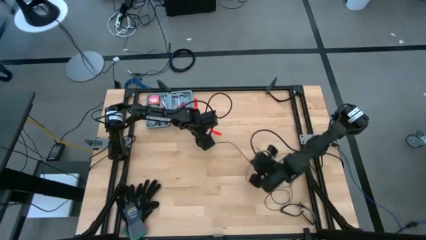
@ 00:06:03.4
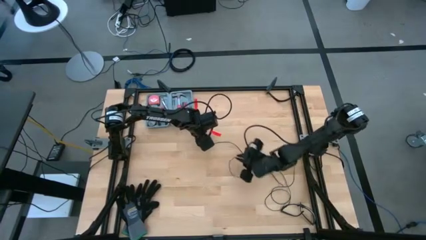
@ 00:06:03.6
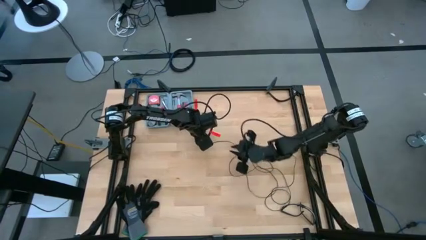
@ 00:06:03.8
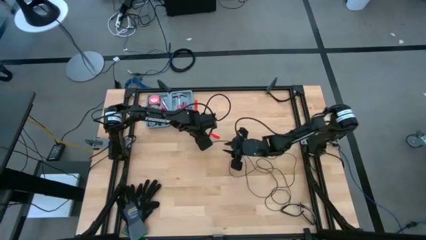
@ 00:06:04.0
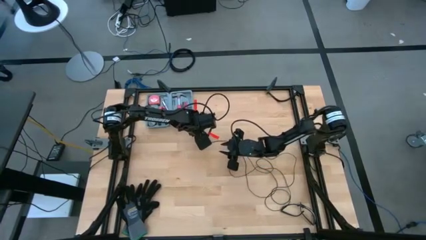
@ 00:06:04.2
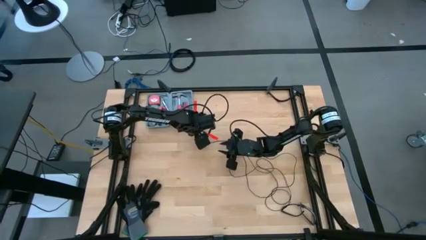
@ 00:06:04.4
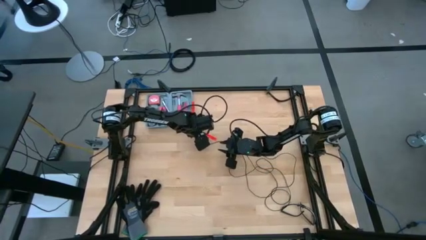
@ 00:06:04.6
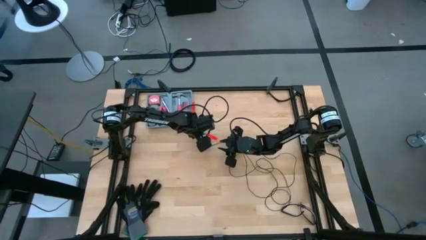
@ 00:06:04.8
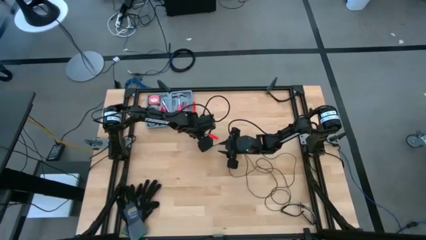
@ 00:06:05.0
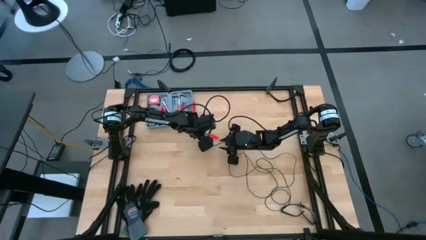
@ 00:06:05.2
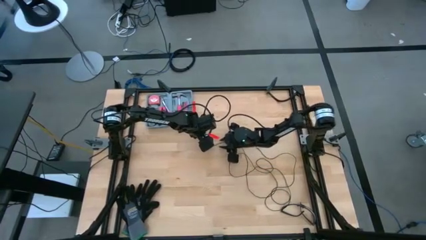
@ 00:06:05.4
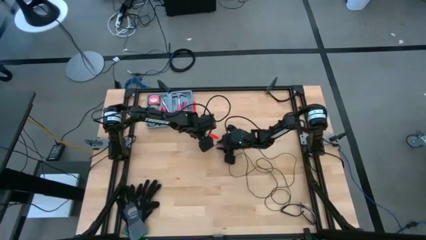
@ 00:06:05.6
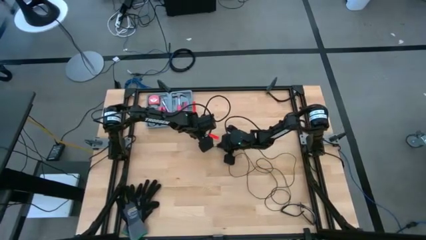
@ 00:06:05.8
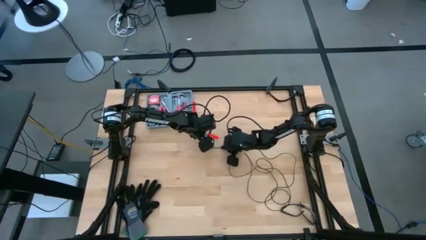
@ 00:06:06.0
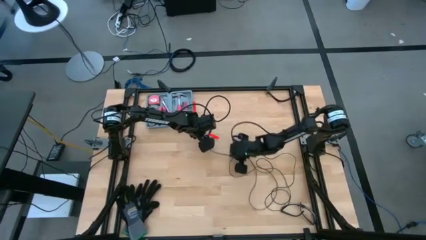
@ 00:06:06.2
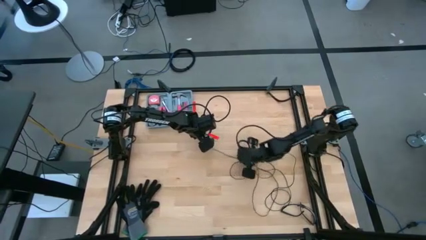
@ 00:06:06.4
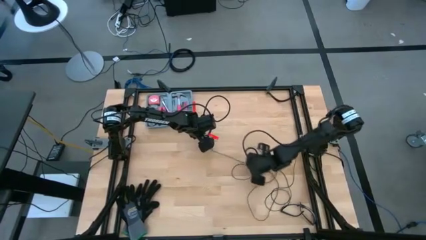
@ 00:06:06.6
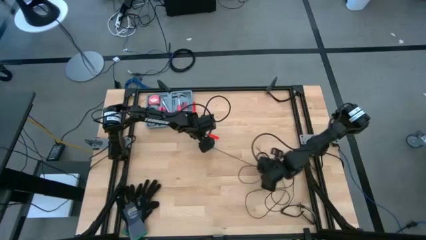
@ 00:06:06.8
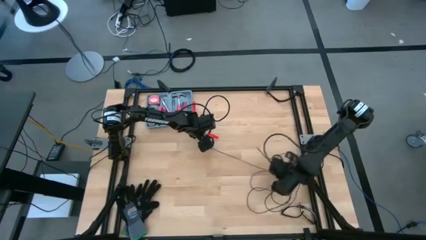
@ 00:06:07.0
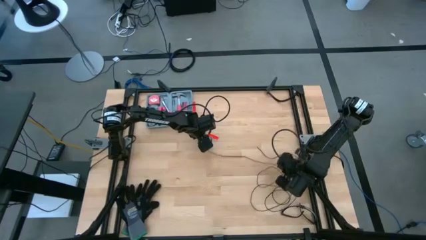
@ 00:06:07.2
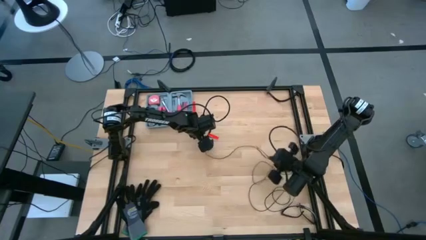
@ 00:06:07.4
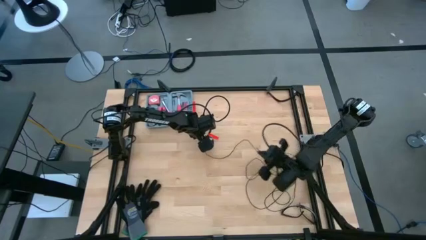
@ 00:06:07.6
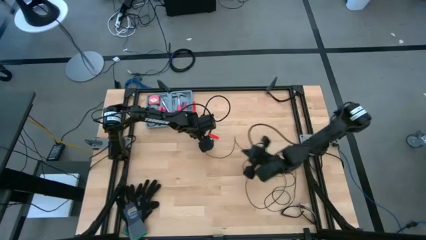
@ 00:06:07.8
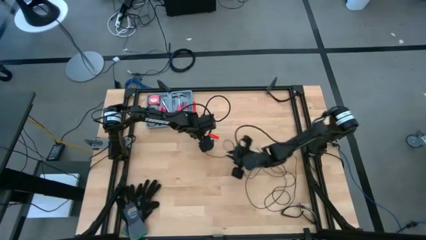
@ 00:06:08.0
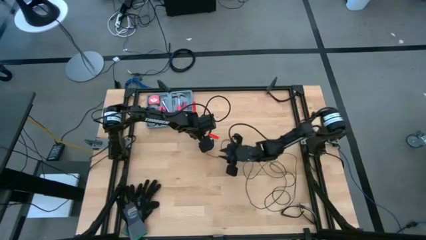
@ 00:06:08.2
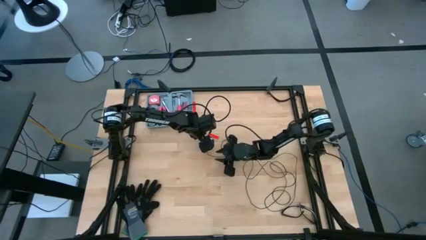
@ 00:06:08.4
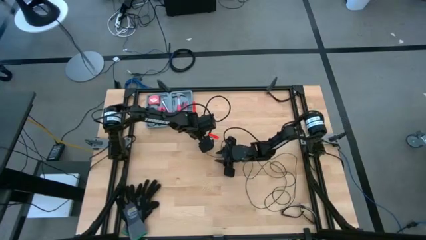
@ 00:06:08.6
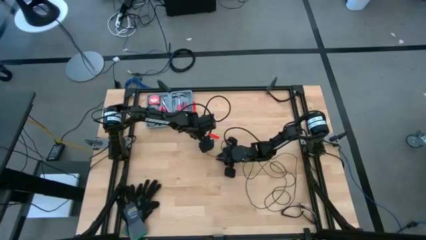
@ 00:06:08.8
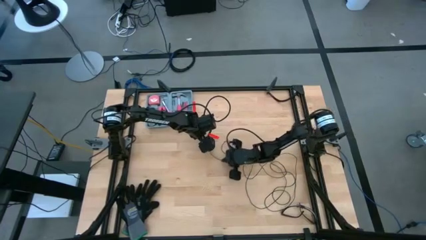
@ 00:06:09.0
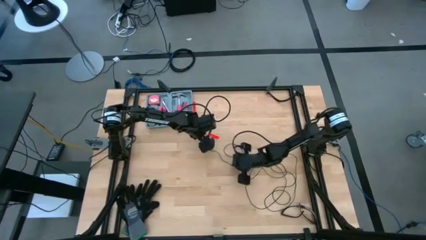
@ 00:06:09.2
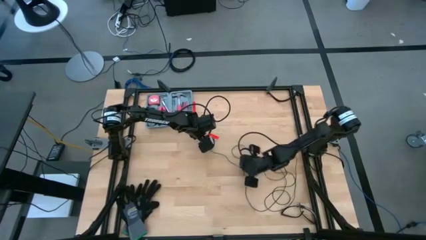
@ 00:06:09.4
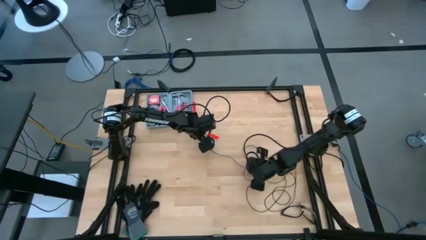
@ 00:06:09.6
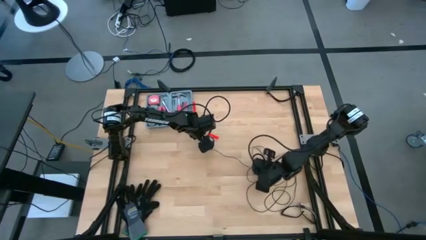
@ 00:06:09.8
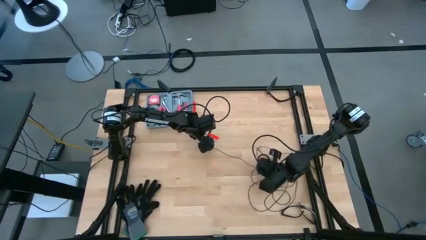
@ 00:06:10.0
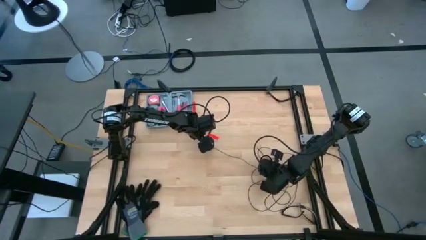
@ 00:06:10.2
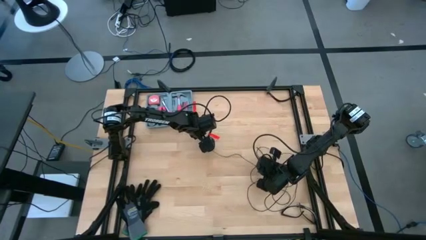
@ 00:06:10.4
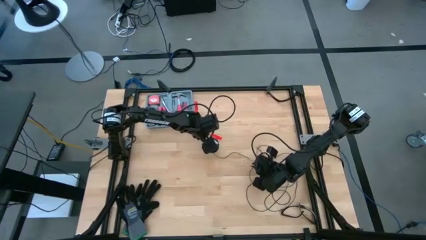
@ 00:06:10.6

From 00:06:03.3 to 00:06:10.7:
Task: Coil cords
Uncoil the black wire from the spool

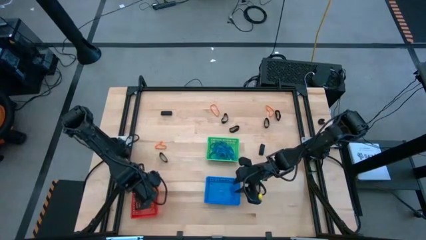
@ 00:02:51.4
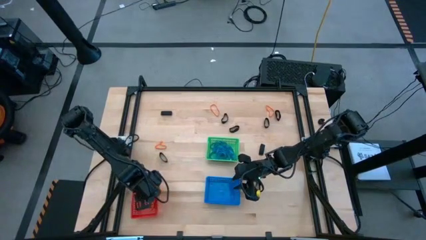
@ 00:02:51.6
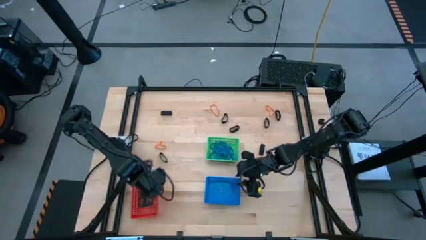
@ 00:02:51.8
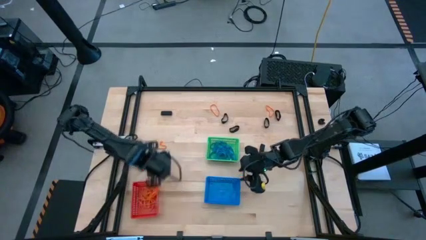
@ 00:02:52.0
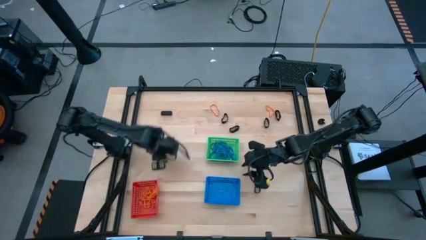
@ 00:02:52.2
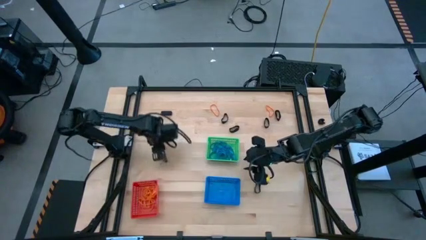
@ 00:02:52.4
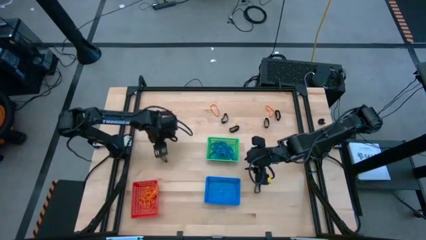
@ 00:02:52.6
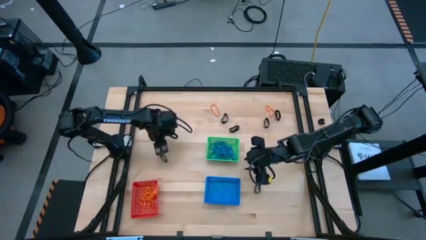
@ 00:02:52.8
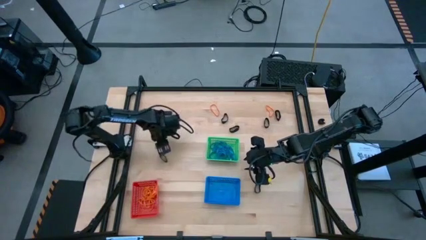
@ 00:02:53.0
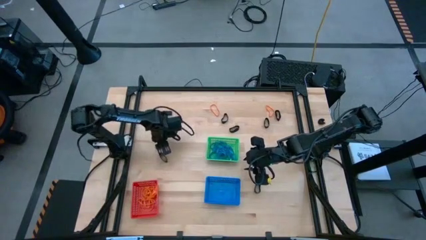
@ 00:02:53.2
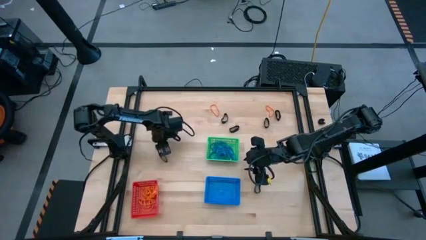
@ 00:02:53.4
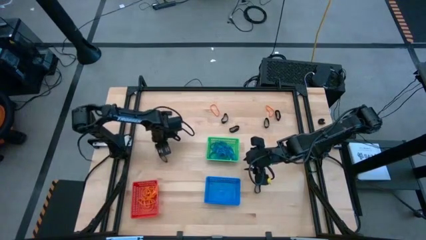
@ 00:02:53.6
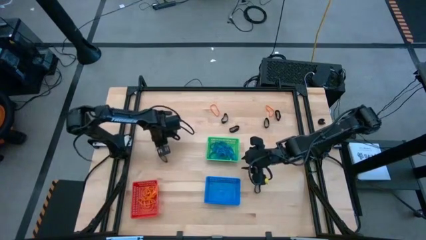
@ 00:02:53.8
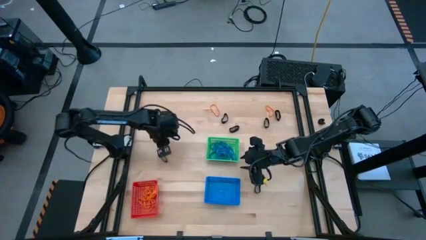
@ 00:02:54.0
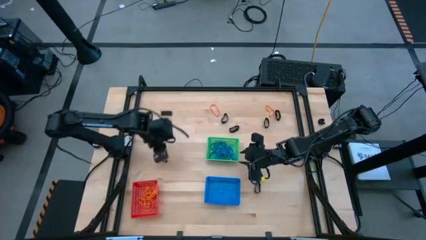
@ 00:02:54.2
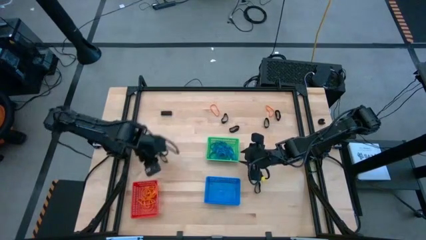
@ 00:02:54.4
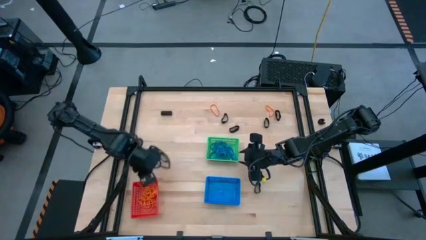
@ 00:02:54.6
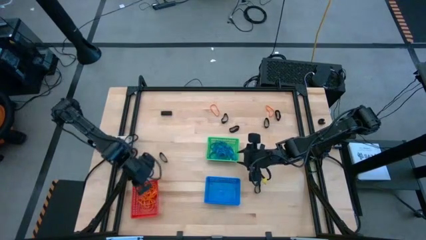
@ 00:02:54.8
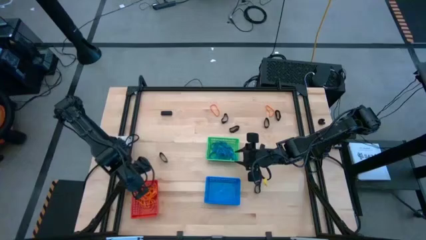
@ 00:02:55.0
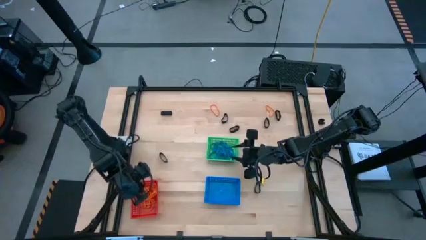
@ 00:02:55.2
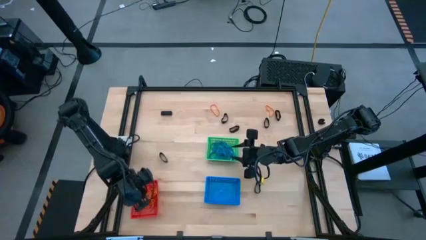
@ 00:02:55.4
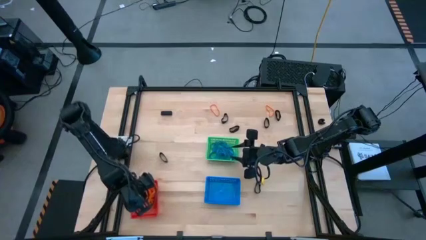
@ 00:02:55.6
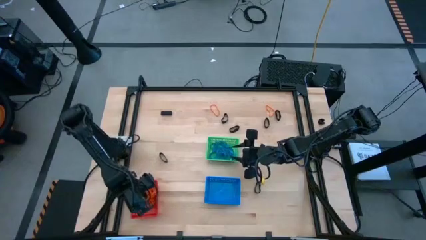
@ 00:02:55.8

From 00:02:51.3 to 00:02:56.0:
Task: Sort rubber bands into baskets
Put the orange rubberband into the red bin

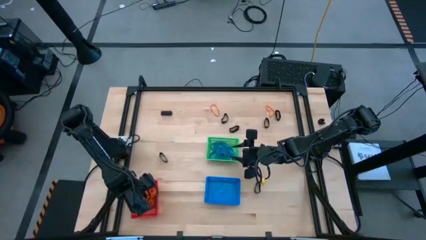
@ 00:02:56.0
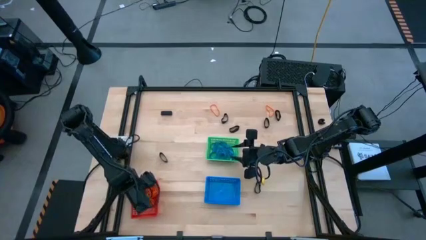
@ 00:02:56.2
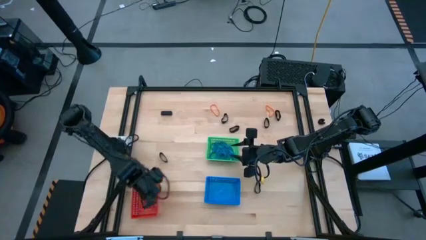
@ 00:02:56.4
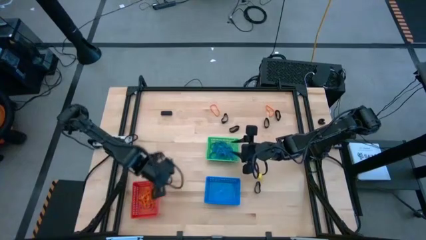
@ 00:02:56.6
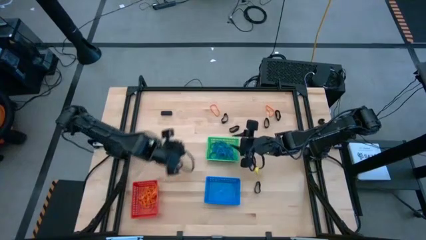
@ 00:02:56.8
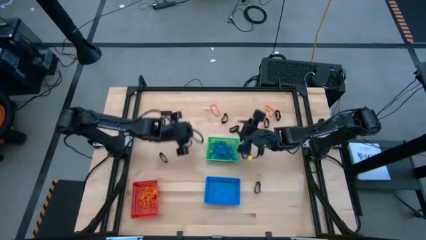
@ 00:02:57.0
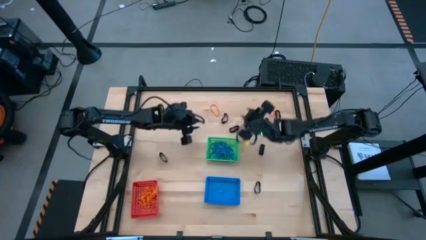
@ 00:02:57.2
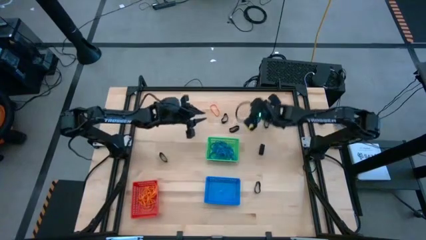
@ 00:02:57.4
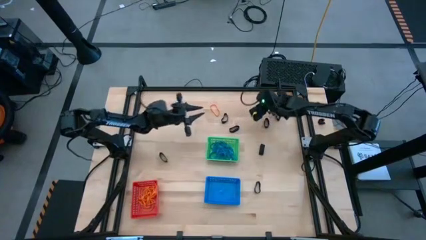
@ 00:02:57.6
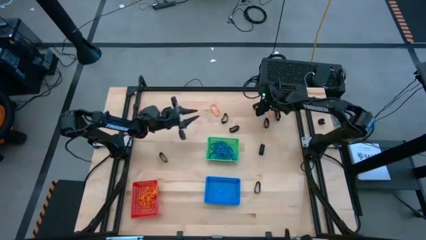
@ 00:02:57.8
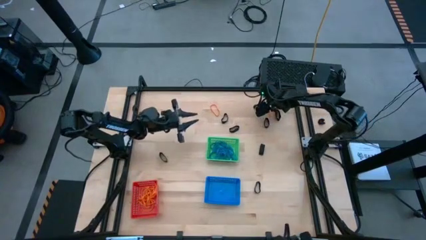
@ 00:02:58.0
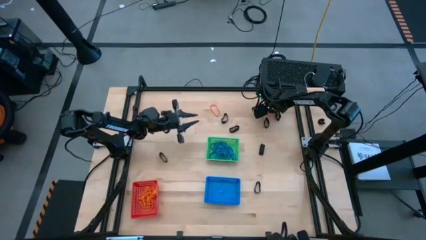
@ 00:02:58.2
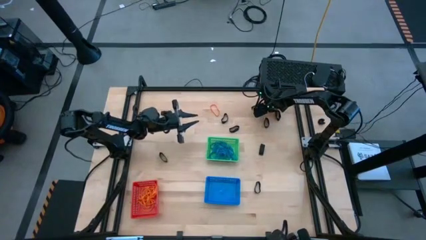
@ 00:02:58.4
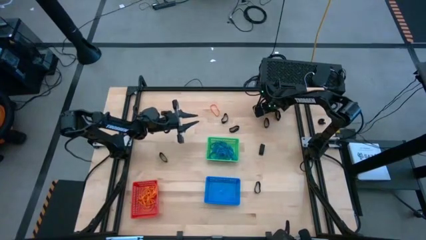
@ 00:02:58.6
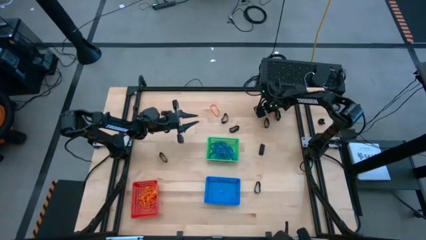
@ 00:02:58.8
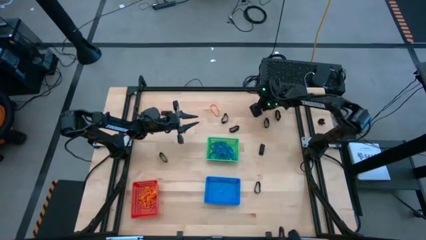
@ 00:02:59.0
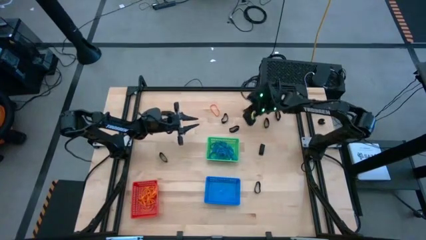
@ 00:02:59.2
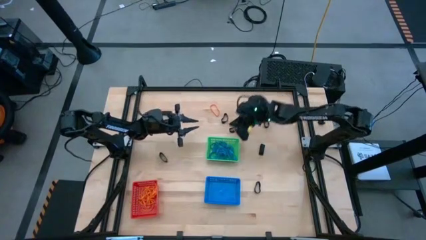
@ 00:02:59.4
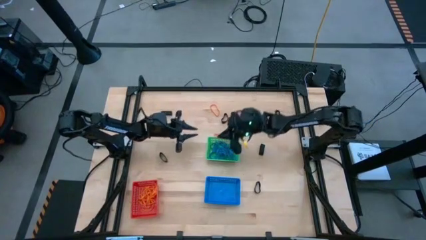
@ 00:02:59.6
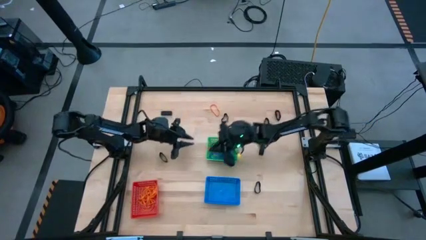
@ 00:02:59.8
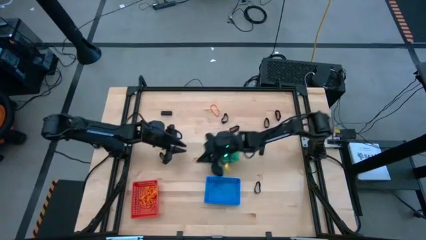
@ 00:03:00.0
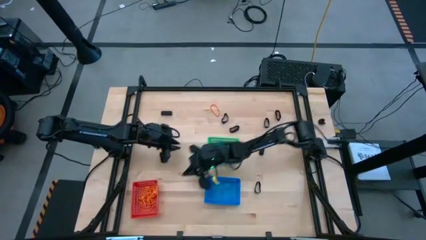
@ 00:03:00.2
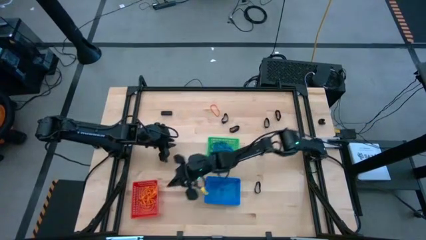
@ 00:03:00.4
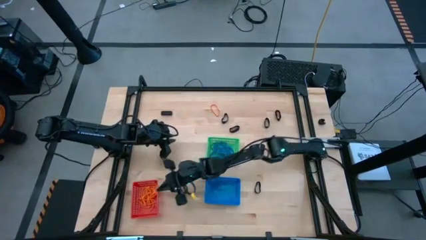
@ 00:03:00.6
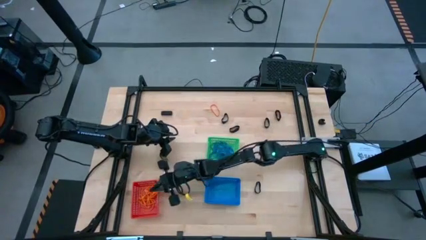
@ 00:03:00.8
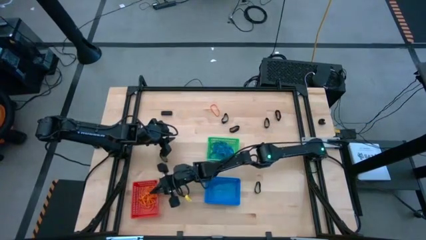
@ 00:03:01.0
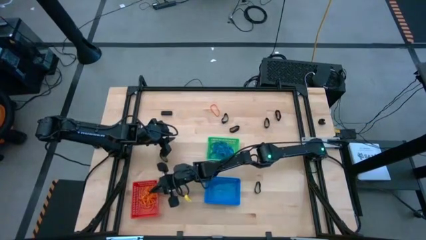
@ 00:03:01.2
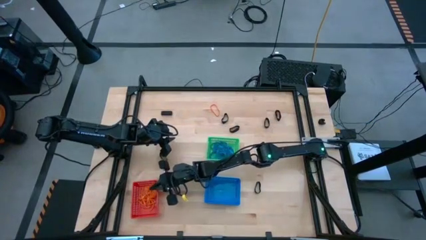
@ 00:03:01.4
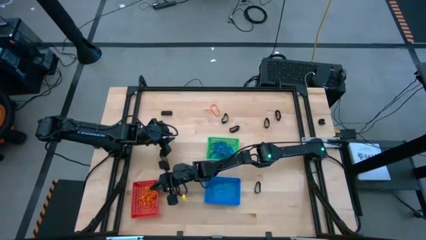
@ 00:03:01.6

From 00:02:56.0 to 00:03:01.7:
Put the orange rubberband into the red bin
